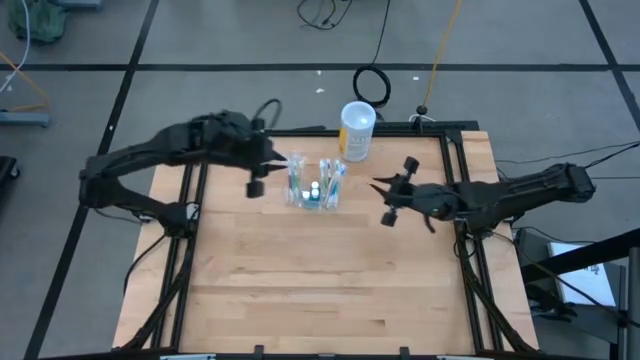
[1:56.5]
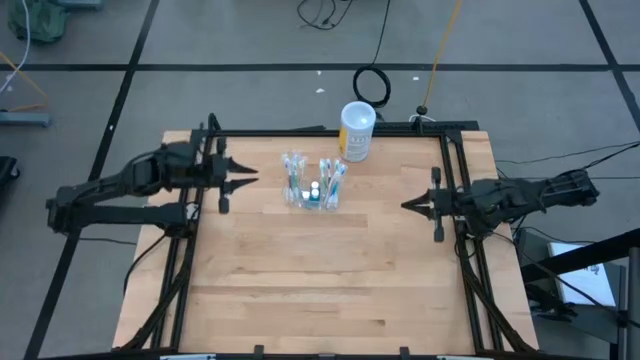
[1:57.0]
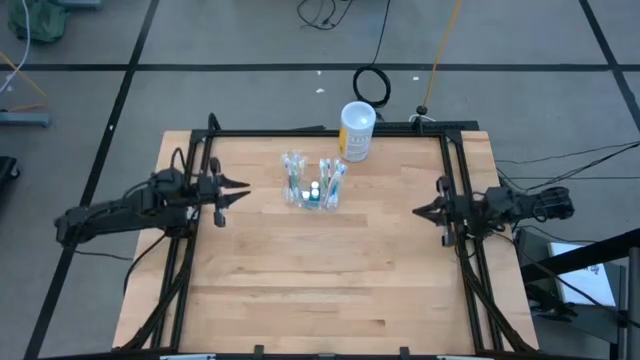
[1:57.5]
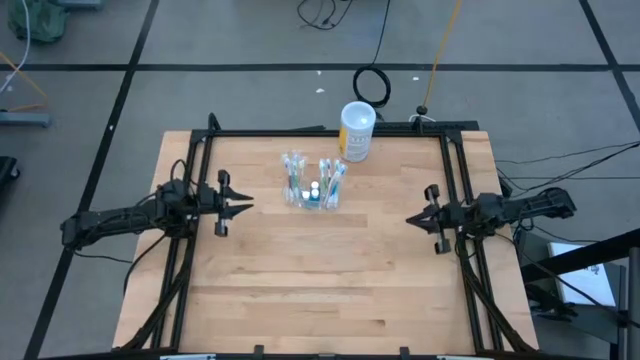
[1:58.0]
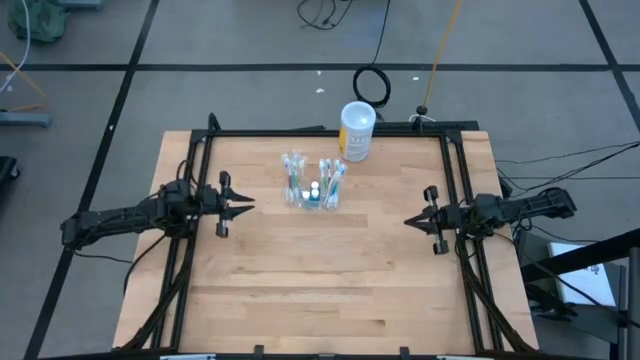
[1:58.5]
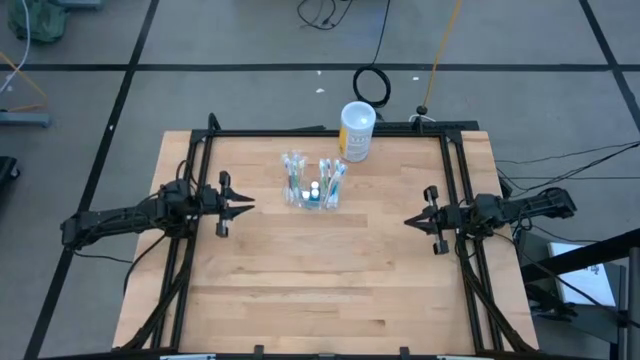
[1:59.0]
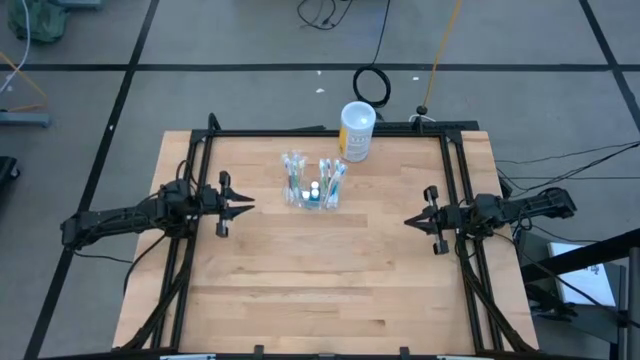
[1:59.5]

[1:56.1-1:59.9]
Task: Pick & Place toothbrushing station
Return to Home Position

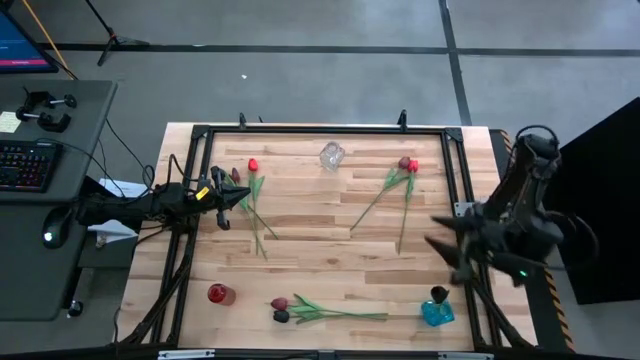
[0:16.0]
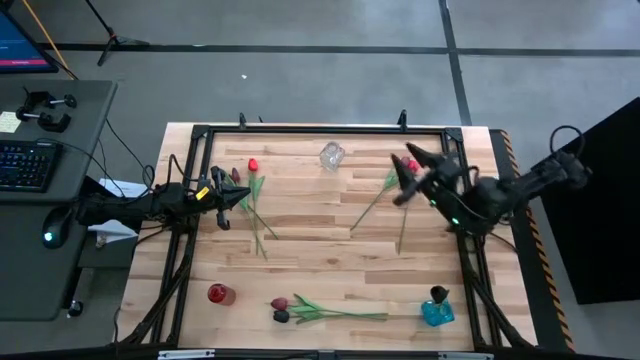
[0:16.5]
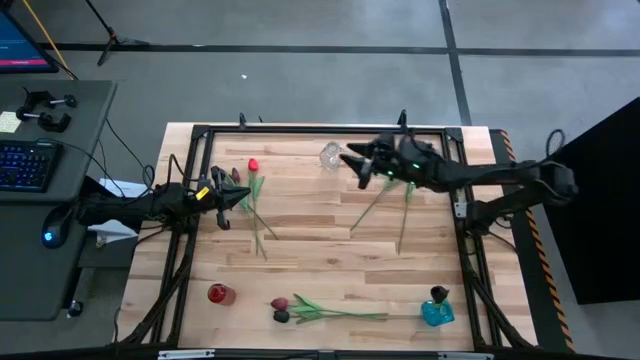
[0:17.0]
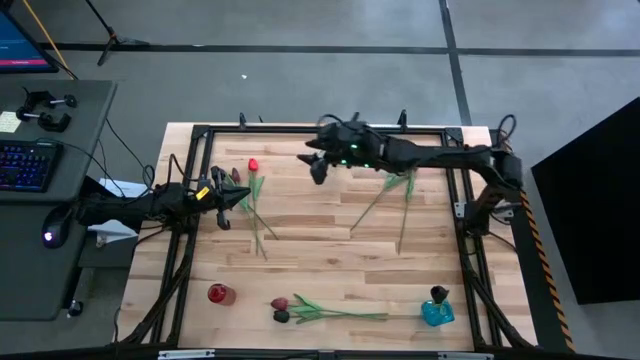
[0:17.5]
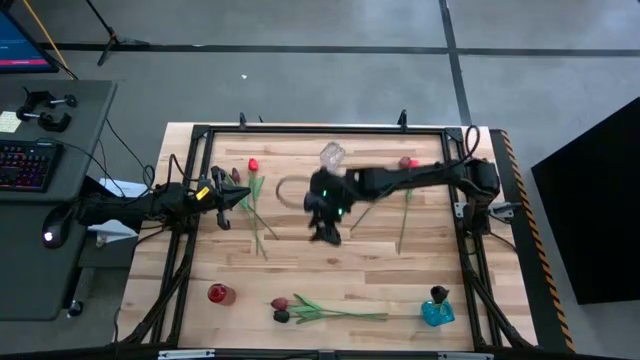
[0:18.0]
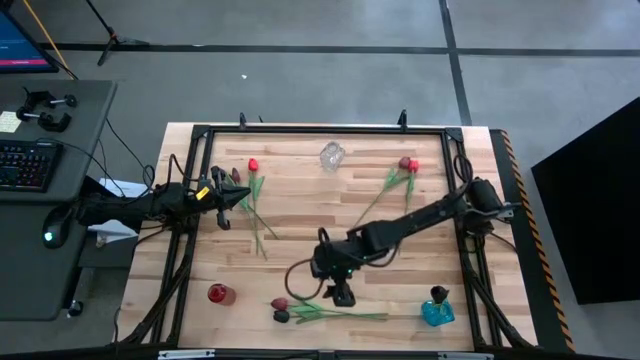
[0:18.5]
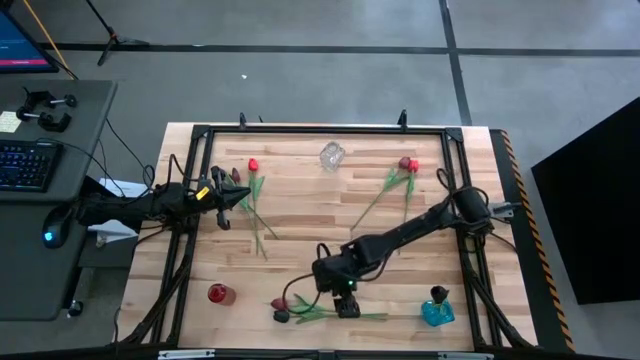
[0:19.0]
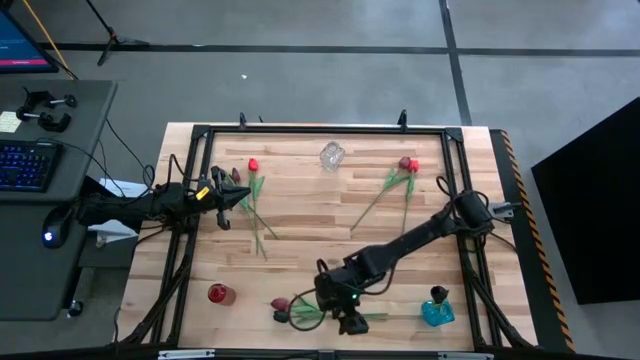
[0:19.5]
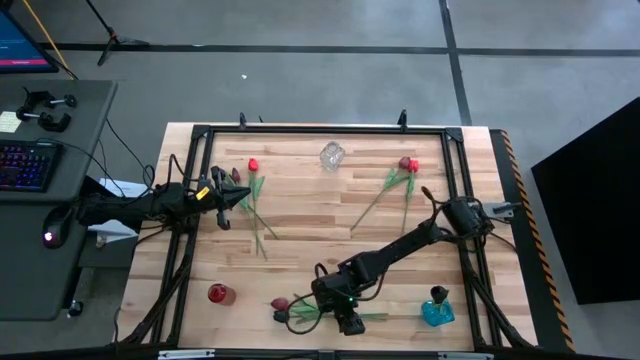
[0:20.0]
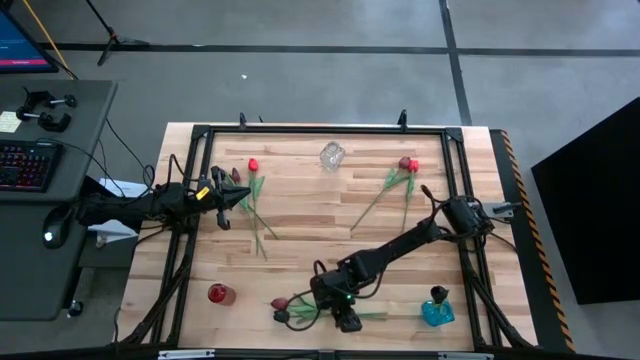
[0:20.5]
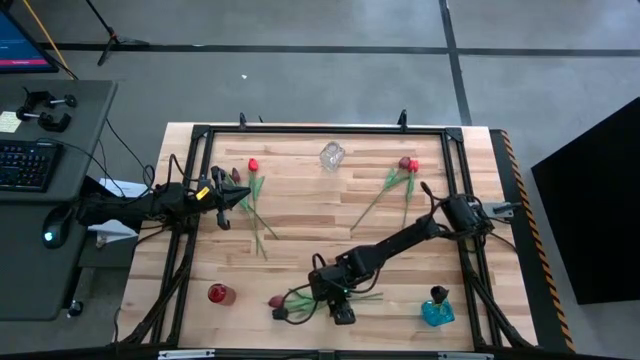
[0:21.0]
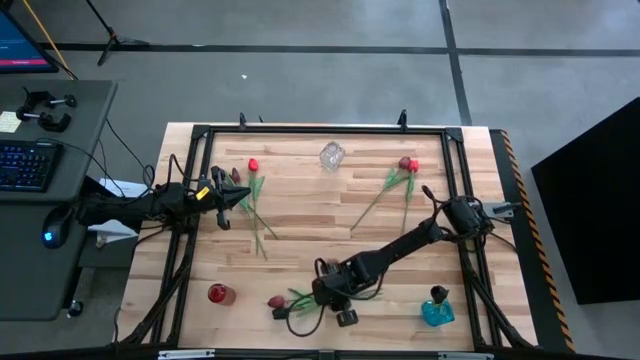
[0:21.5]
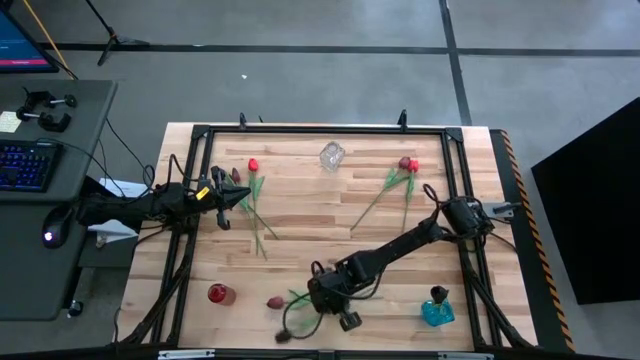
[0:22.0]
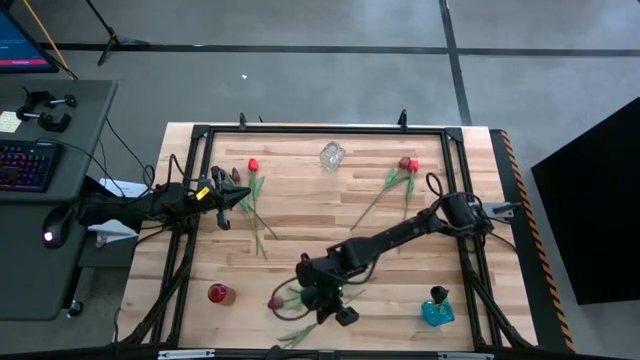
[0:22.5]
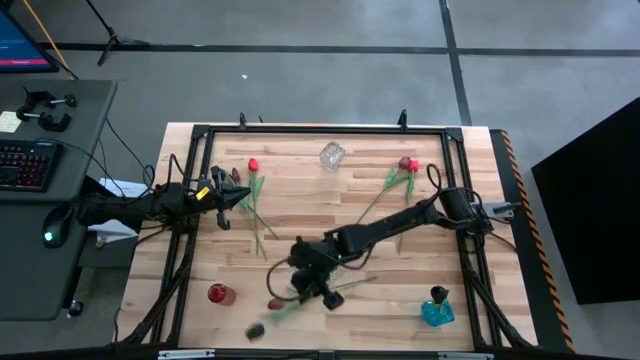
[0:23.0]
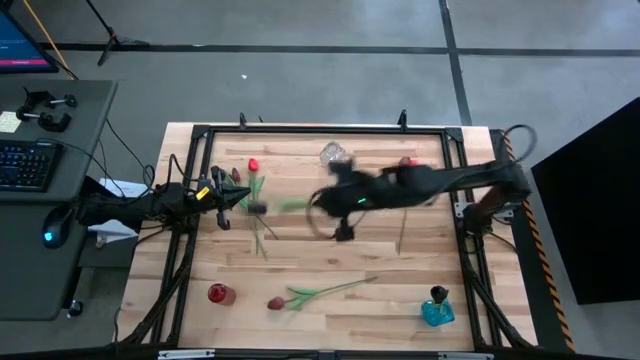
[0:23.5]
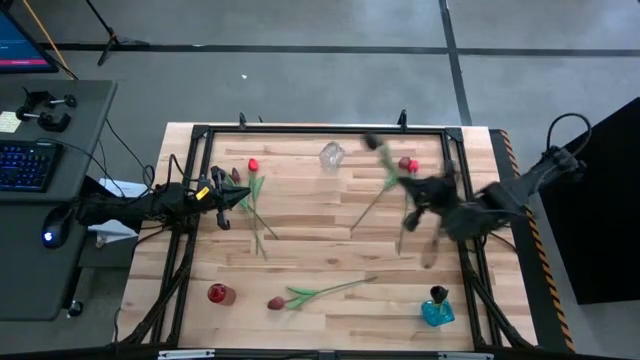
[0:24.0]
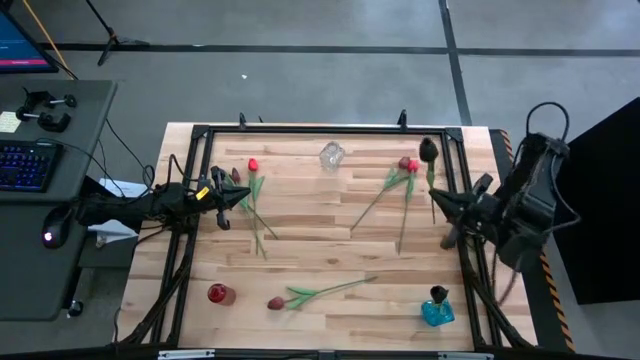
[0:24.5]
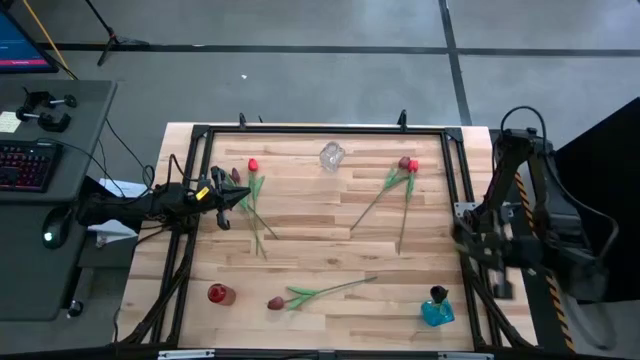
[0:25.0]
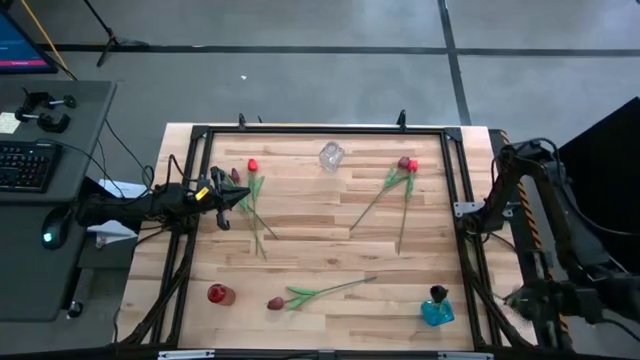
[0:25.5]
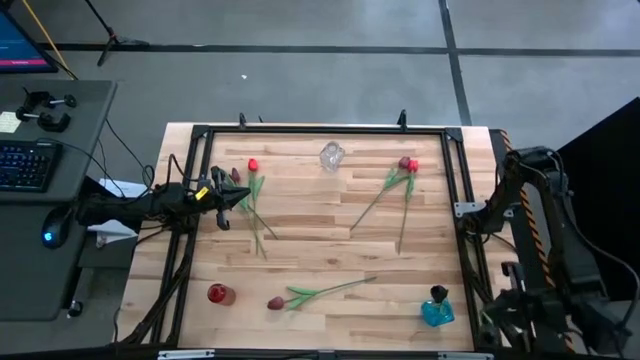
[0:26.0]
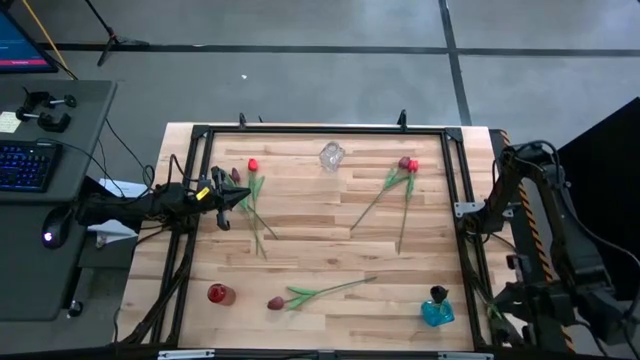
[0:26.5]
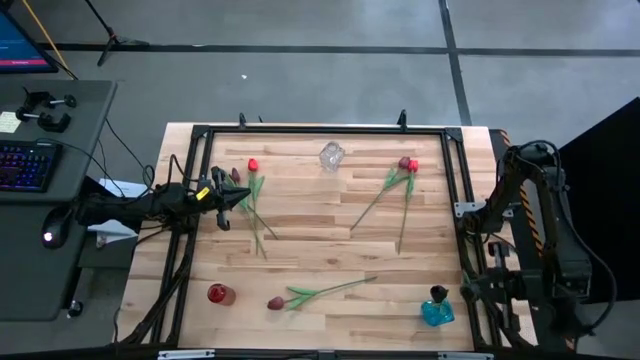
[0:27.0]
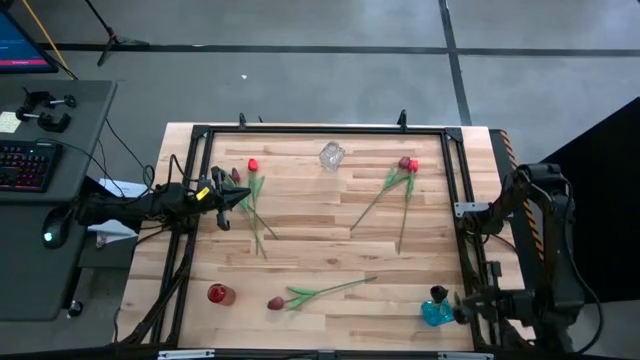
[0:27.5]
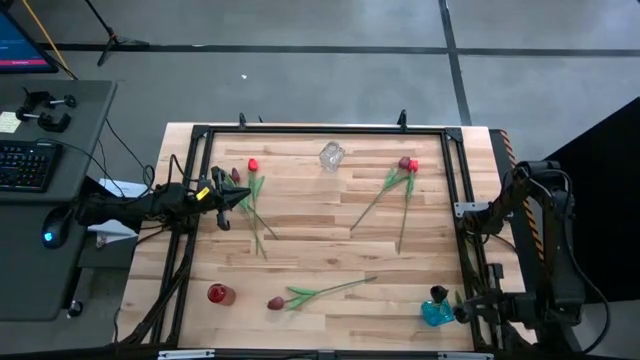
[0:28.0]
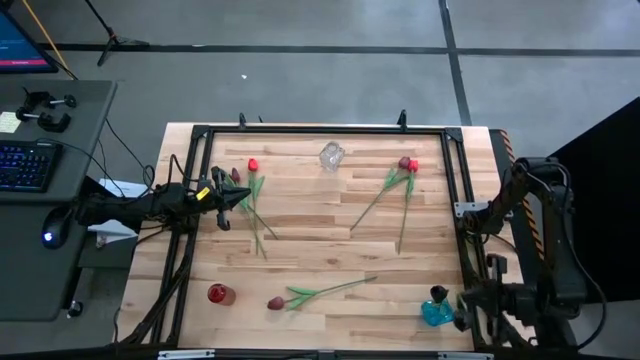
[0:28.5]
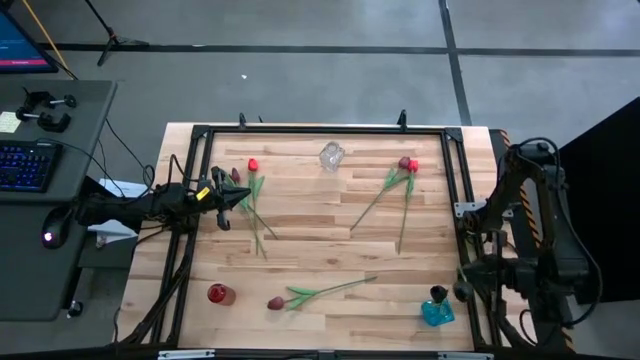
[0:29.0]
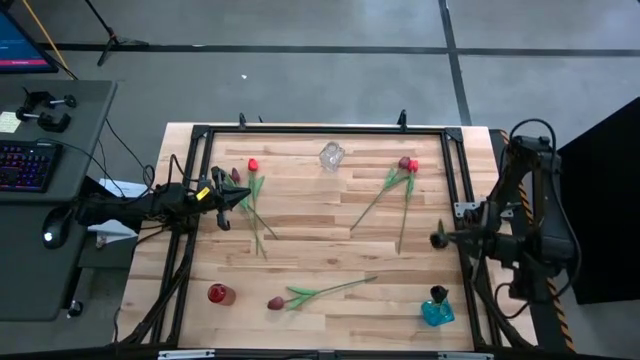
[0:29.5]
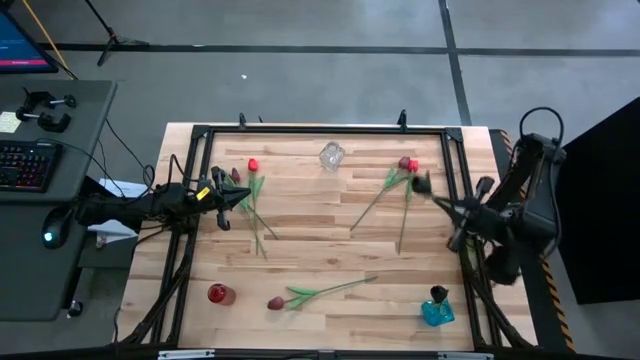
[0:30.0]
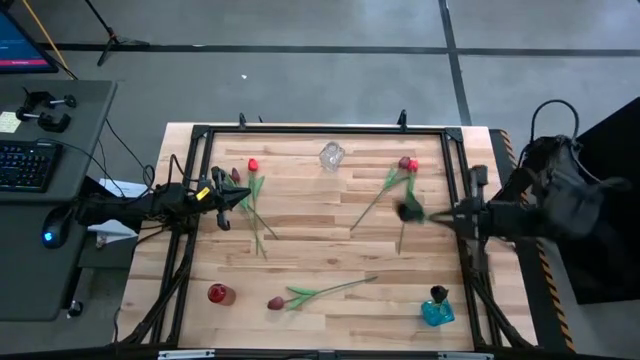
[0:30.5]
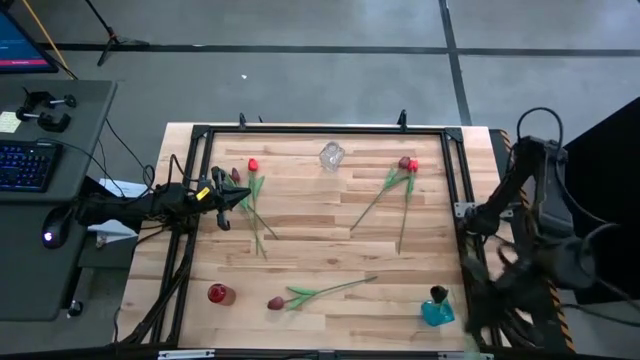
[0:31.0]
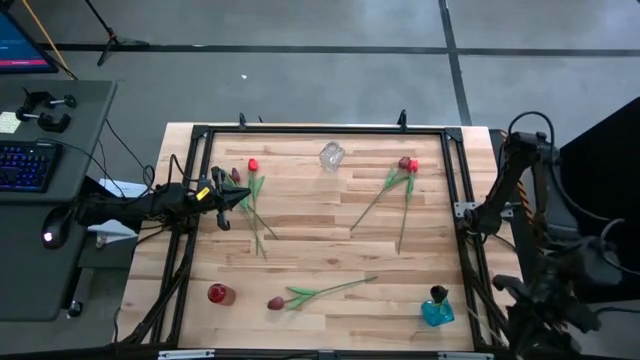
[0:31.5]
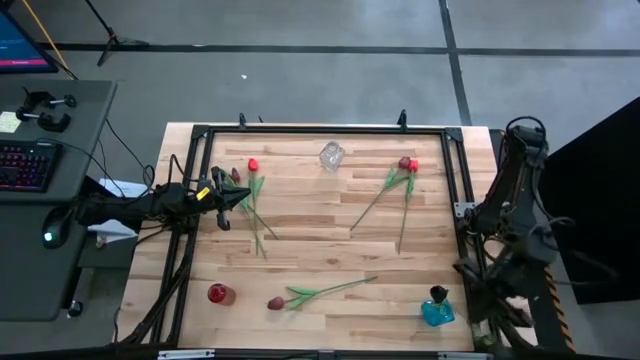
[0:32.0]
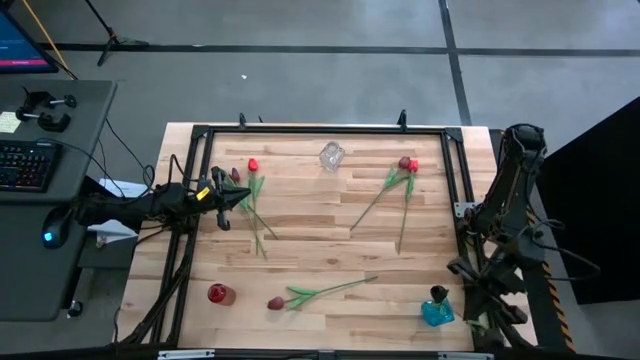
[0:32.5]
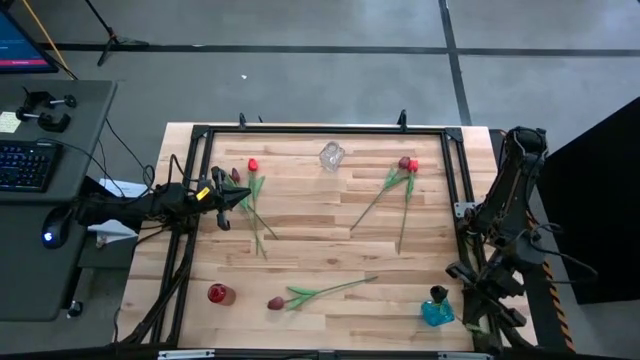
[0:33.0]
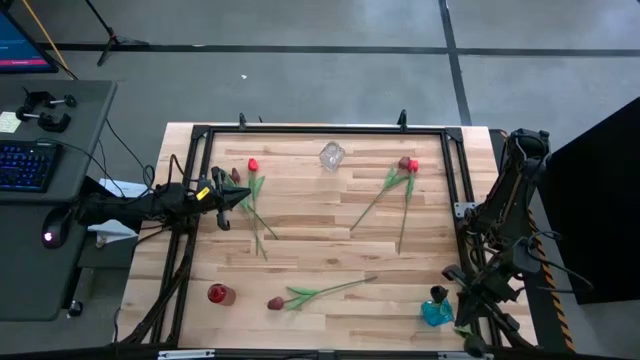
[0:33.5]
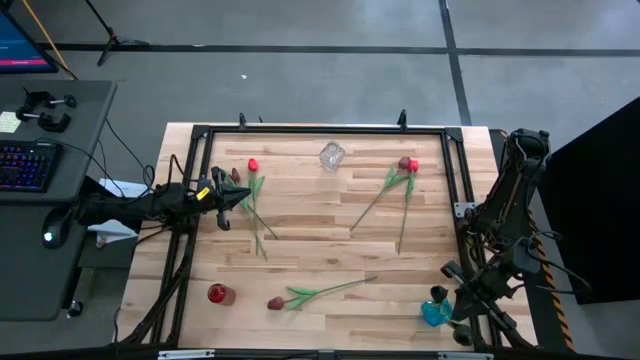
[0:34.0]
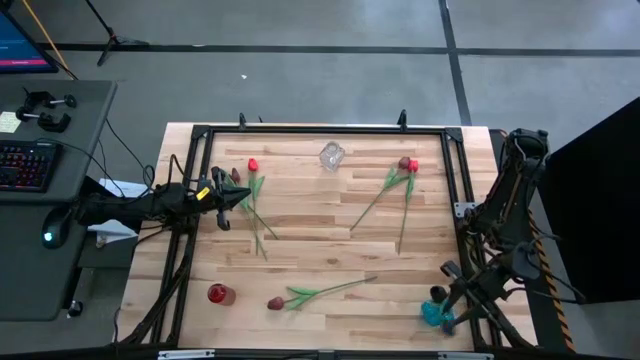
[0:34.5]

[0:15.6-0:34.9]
Task: Sort flowers into vase by color
Put the bottom black flower into the blue vase
